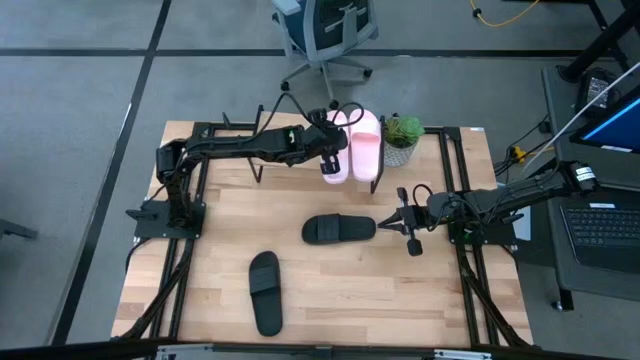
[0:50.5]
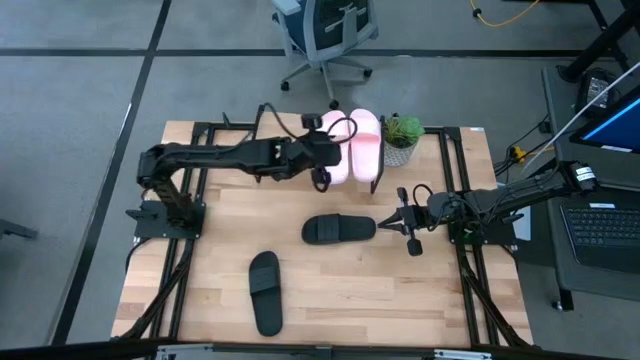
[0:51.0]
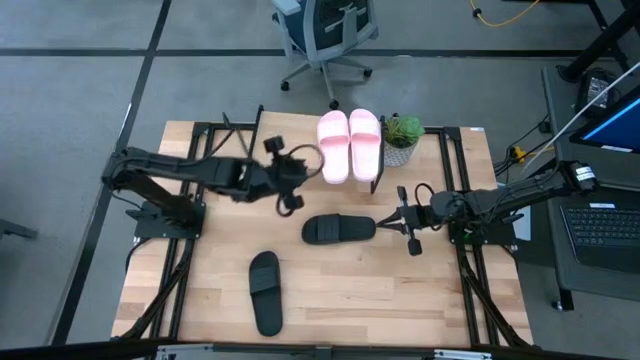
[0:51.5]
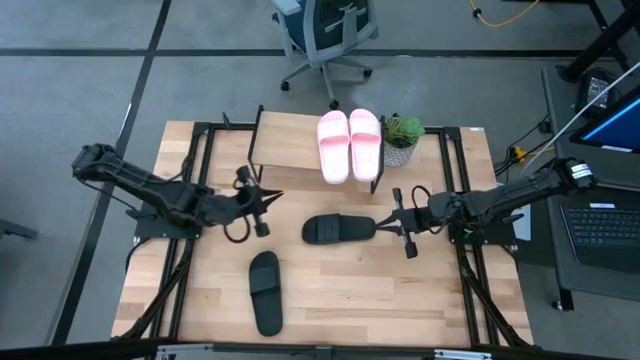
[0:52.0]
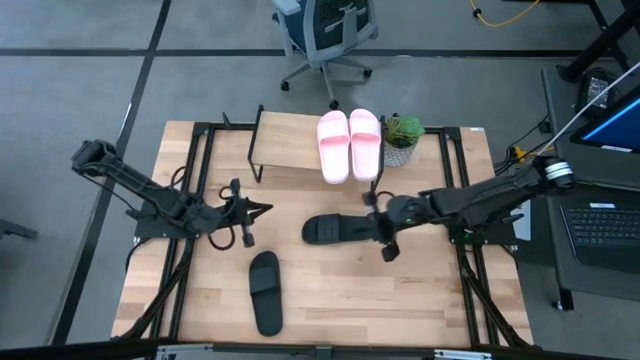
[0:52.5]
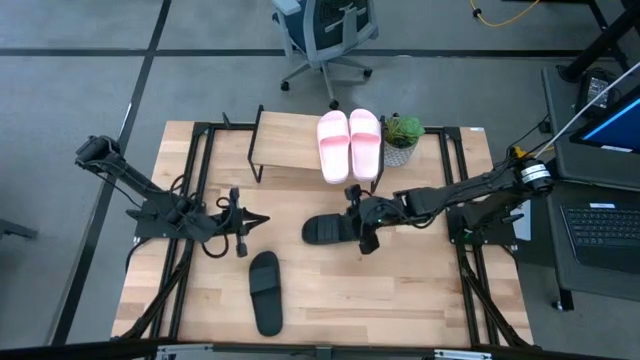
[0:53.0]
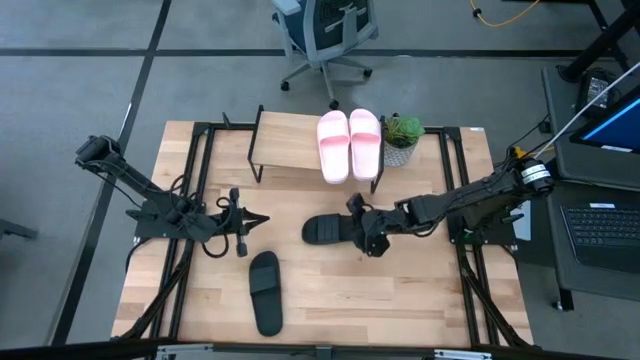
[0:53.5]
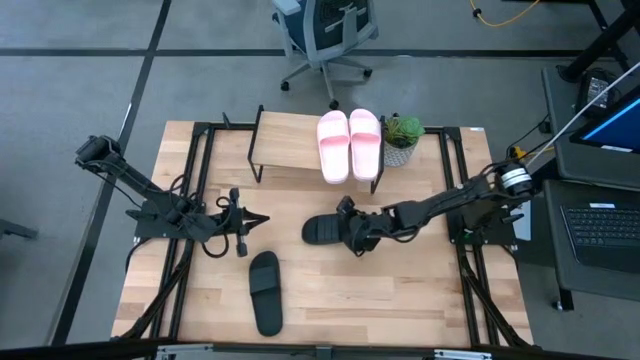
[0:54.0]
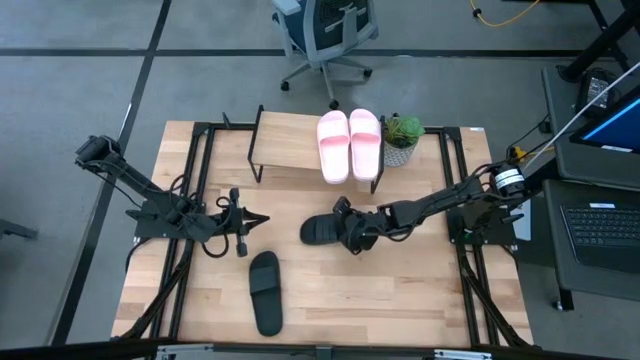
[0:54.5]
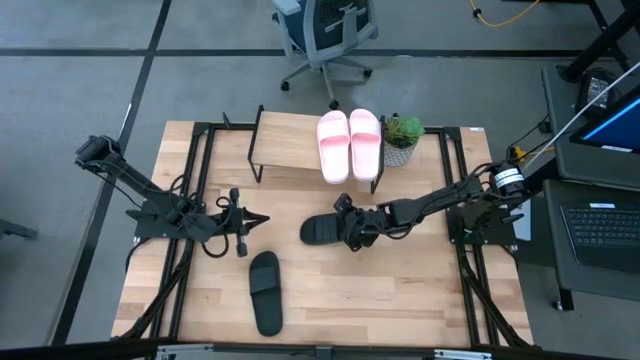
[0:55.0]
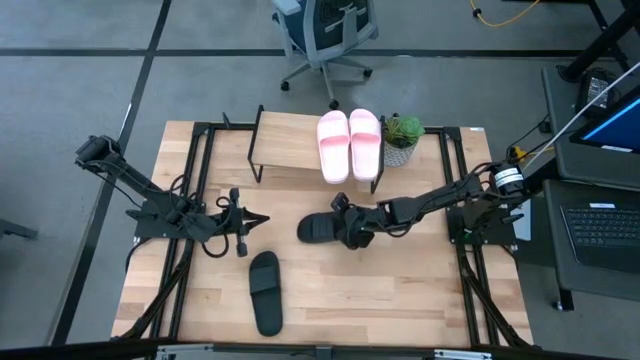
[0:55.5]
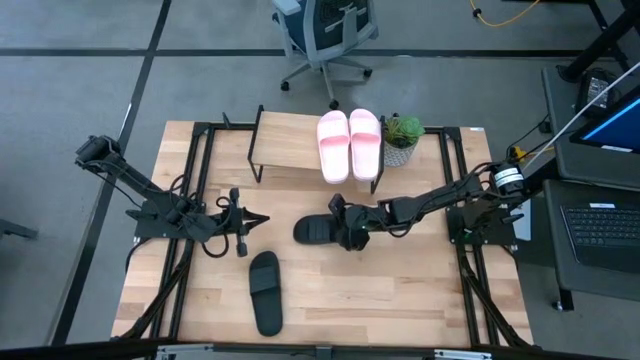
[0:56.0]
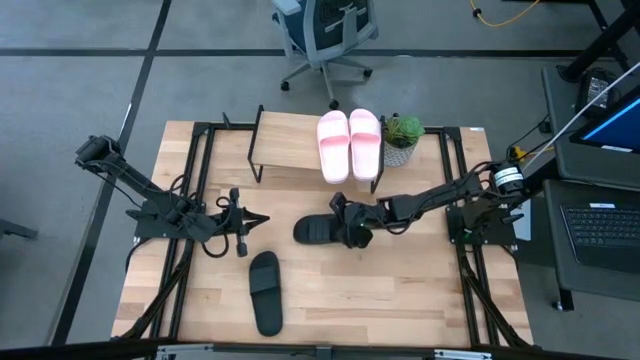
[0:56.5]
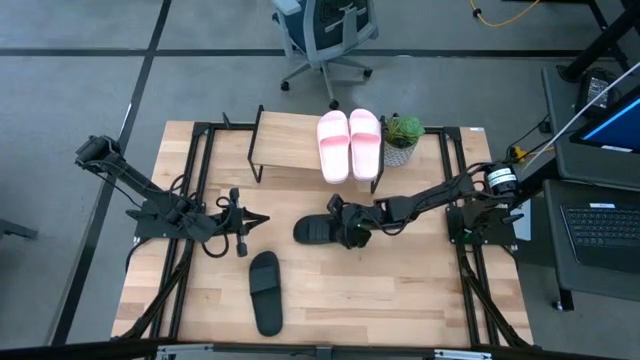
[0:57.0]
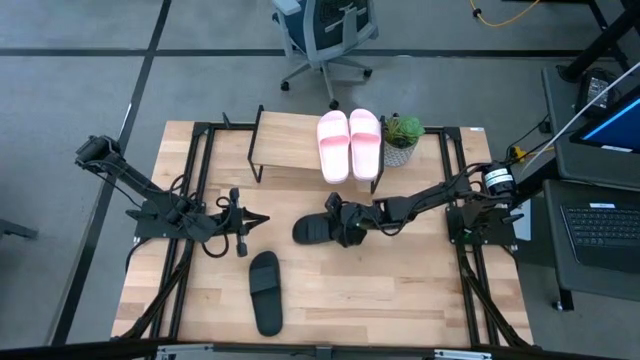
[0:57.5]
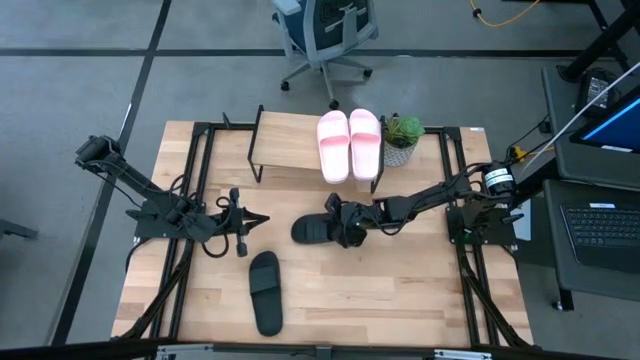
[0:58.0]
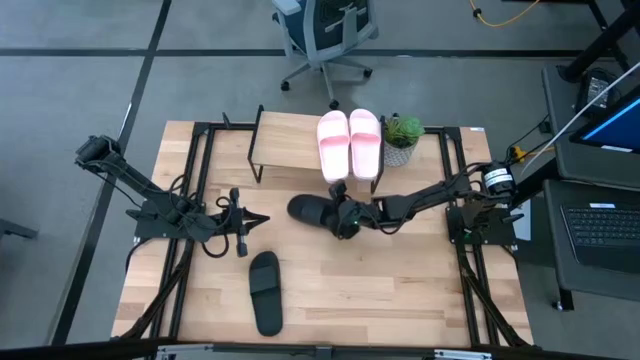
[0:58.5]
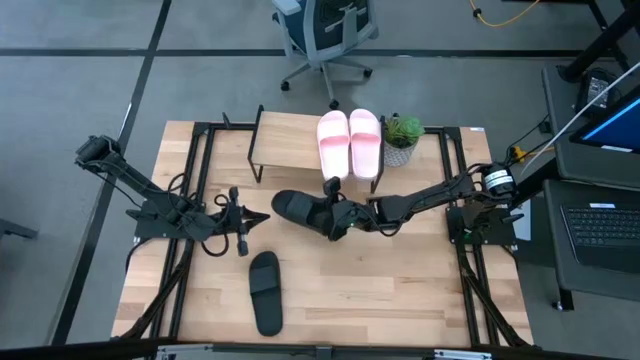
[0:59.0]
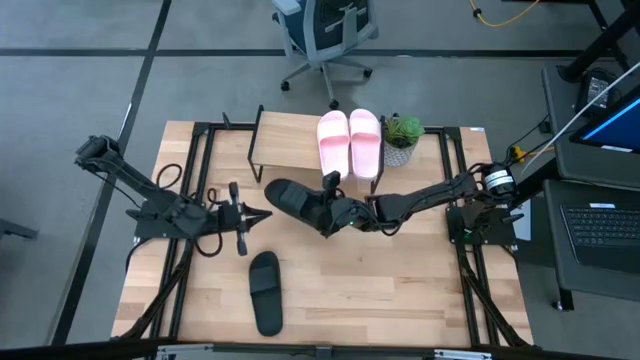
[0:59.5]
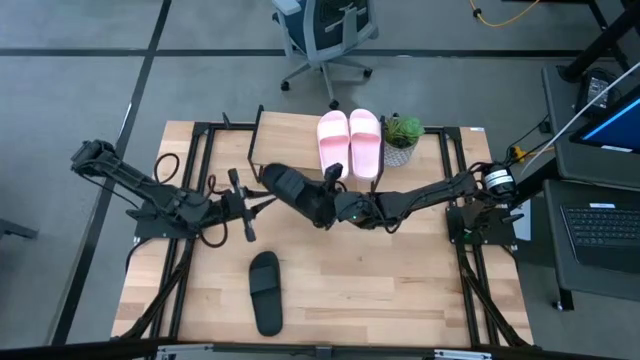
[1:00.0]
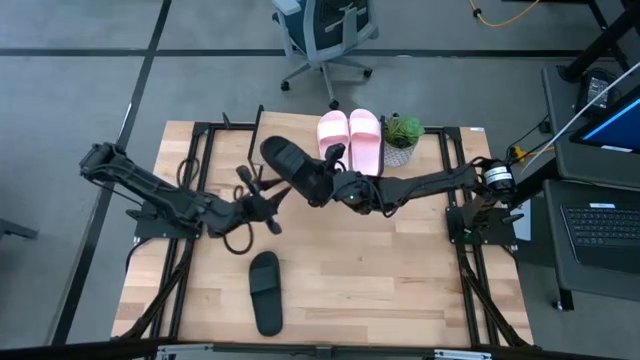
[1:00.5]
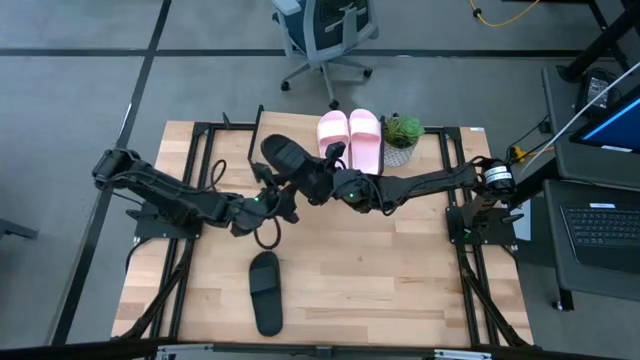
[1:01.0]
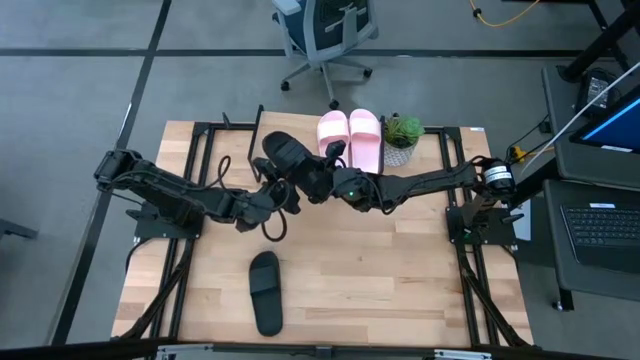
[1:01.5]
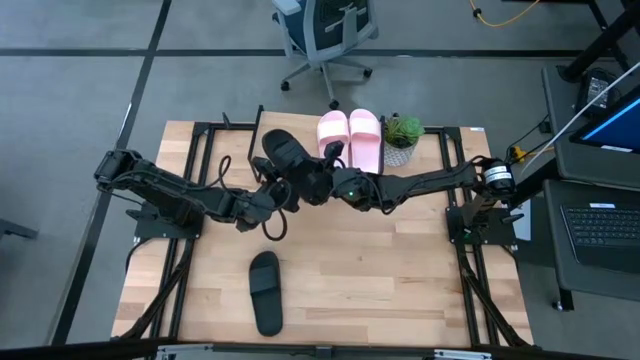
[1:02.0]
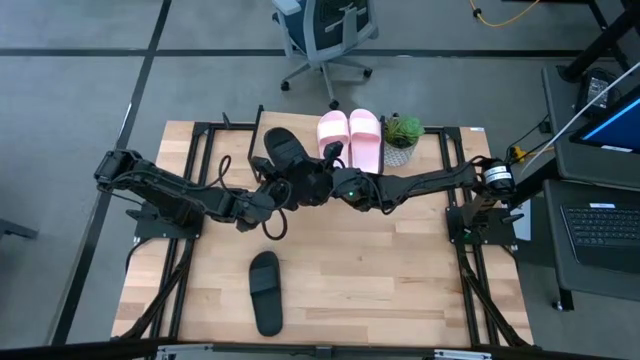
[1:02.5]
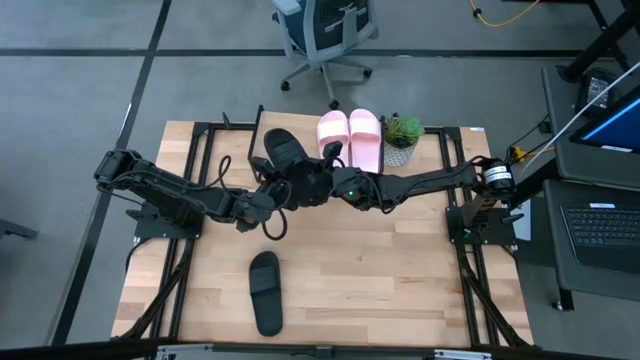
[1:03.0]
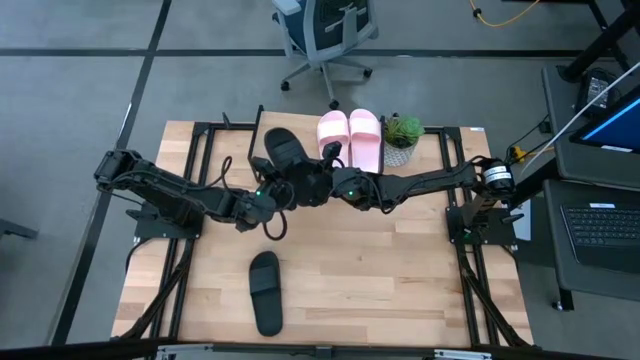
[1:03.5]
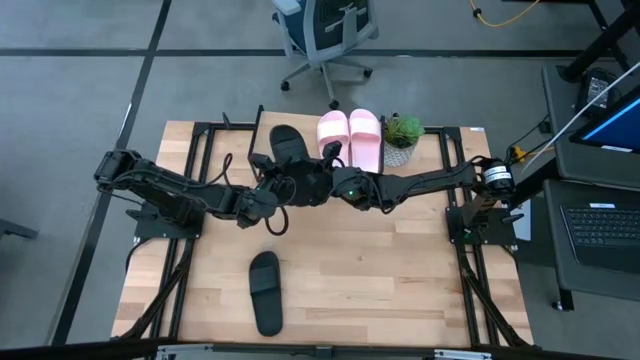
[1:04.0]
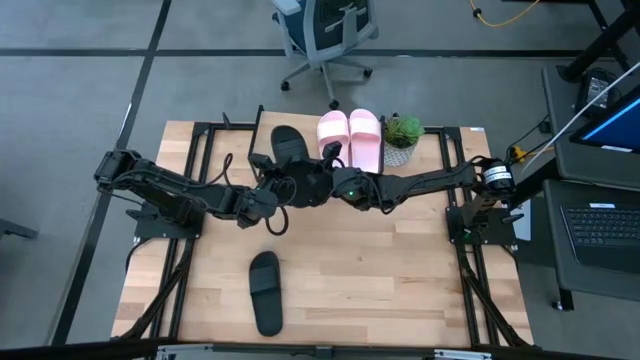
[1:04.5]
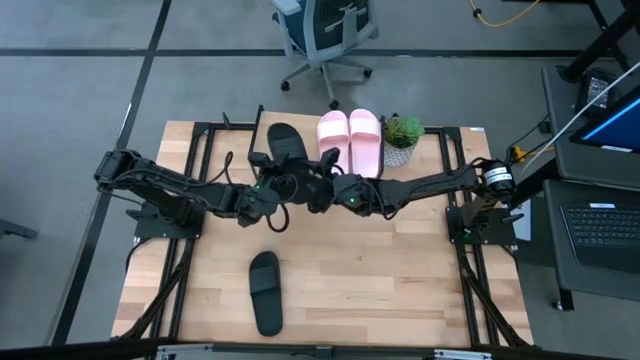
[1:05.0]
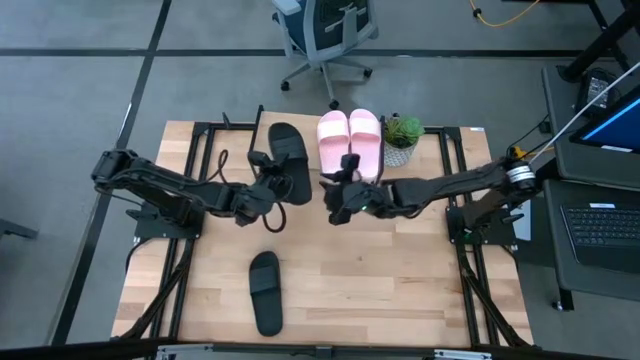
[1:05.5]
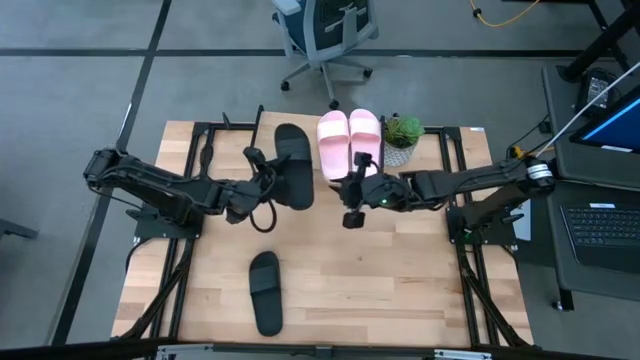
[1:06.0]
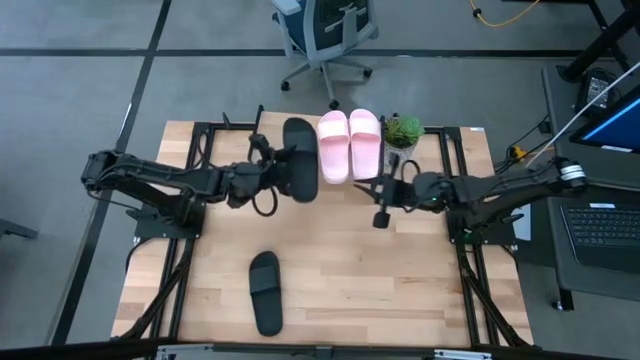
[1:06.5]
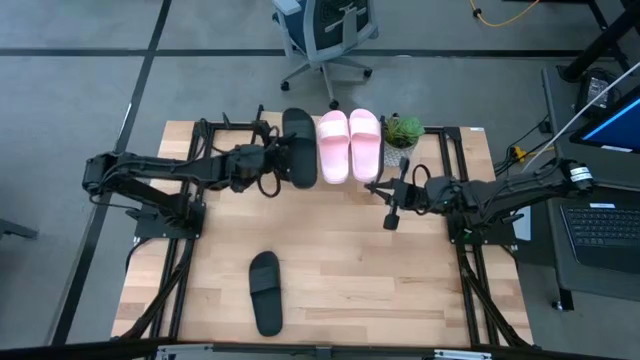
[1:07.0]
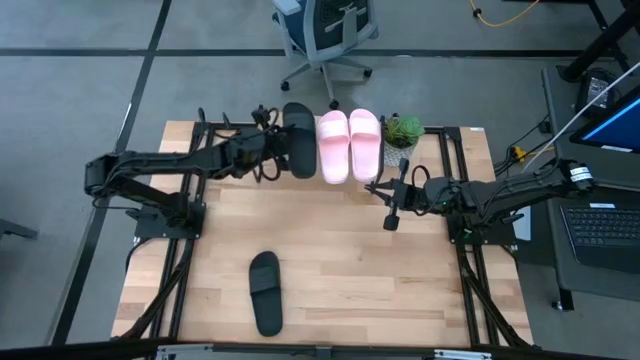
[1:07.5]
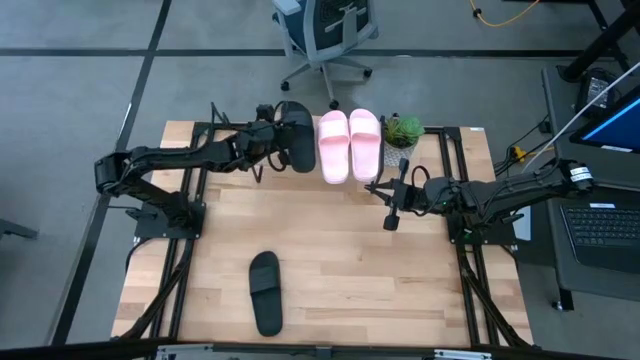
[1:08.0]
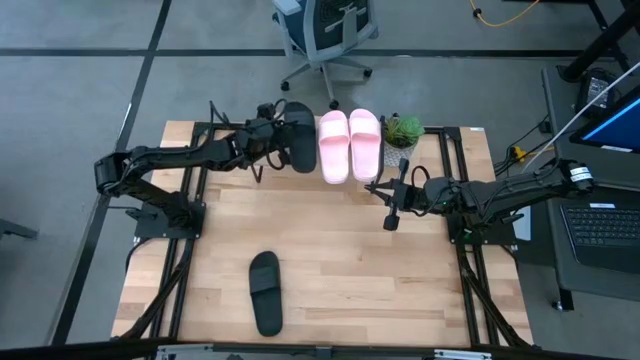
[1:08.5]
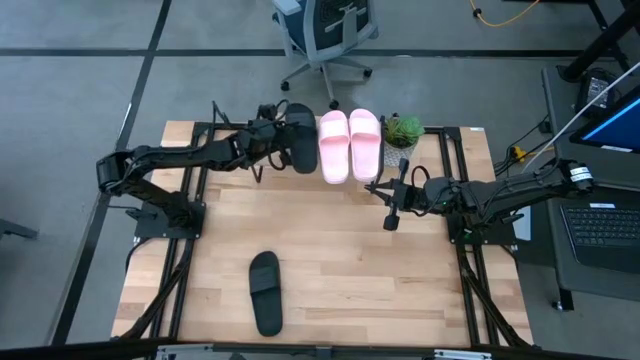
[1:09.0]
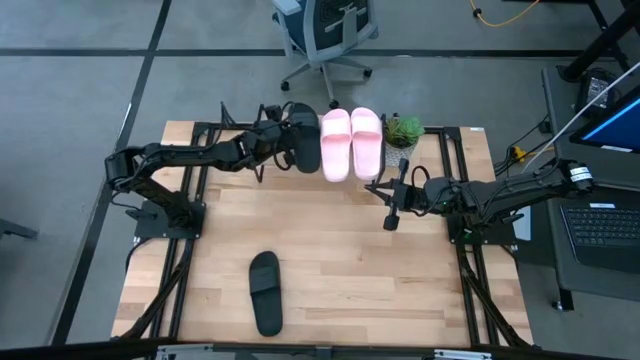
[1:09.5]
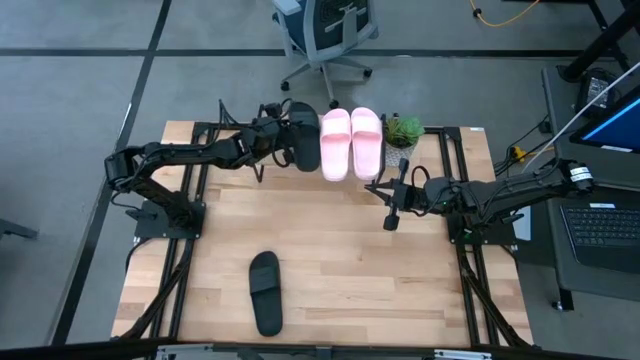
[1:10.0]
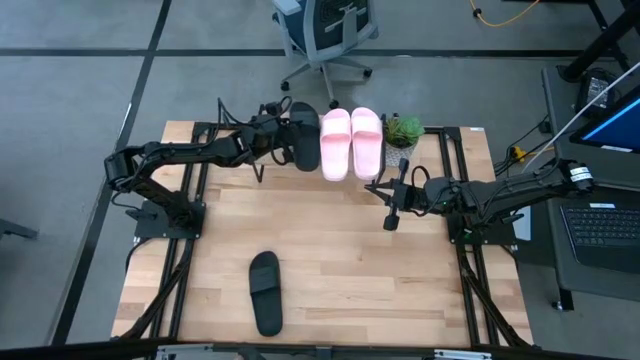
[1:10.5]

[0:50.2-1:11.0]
Task: Pick and place slides into the shelf
Put the top black slides on the shelf
